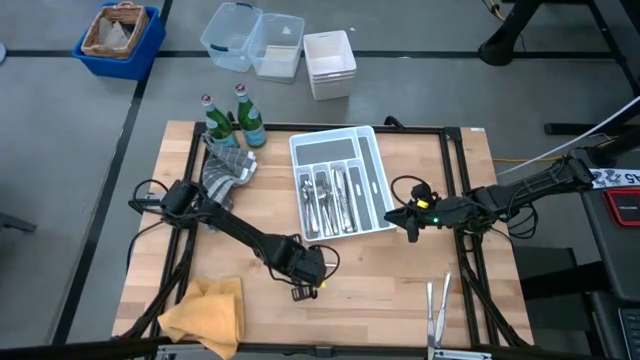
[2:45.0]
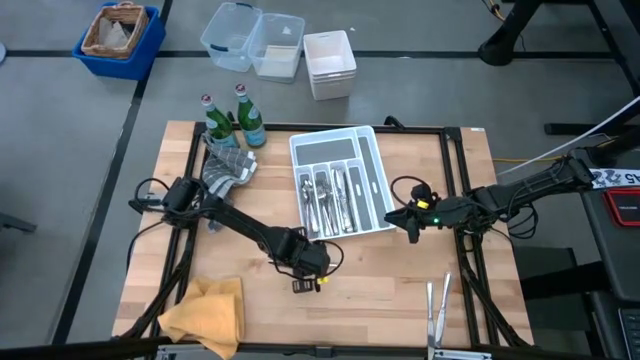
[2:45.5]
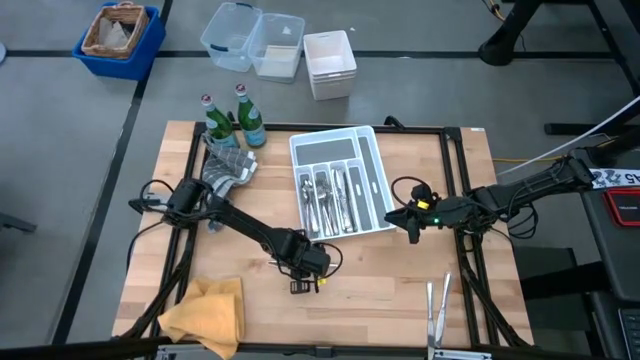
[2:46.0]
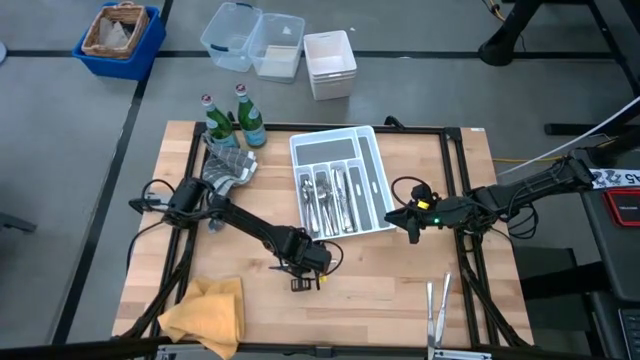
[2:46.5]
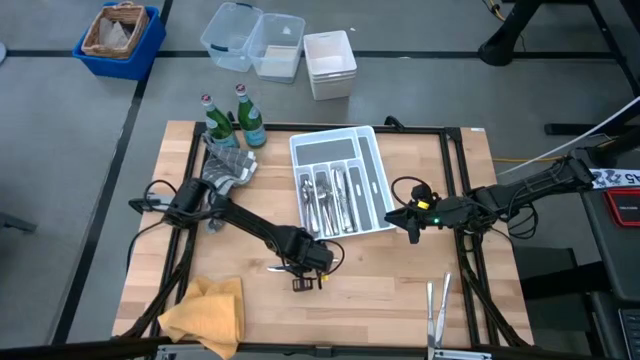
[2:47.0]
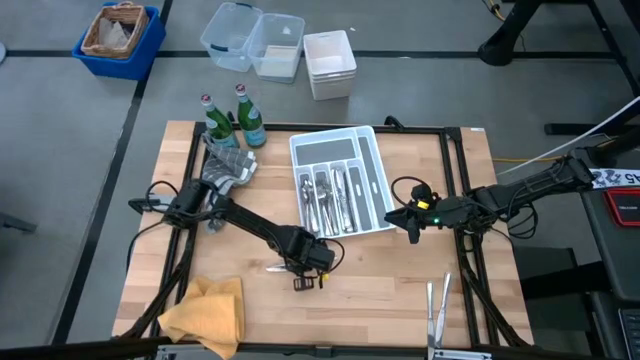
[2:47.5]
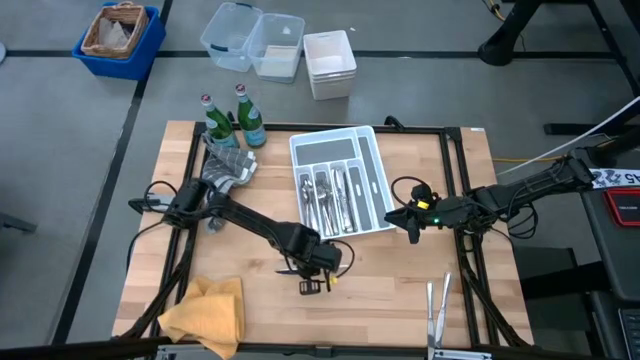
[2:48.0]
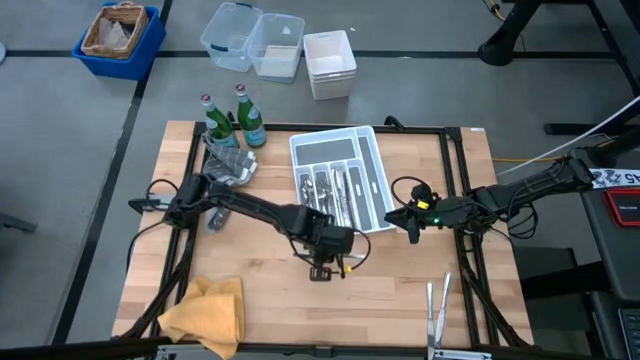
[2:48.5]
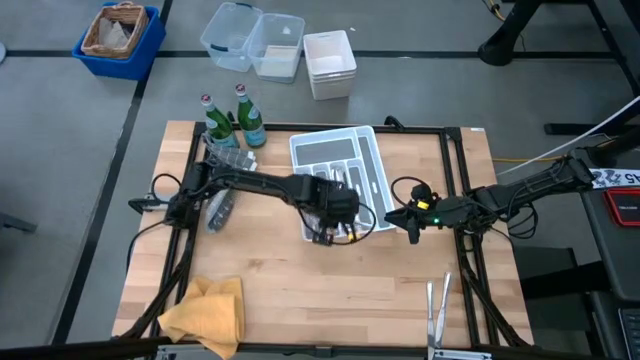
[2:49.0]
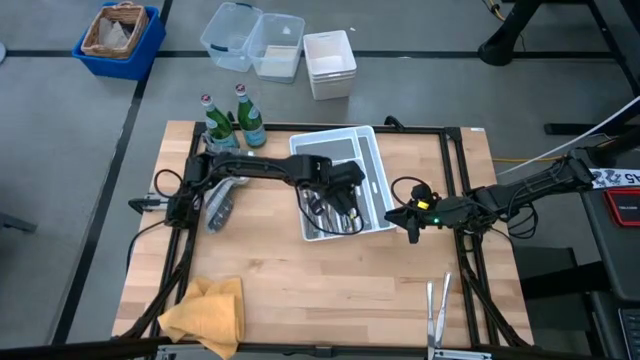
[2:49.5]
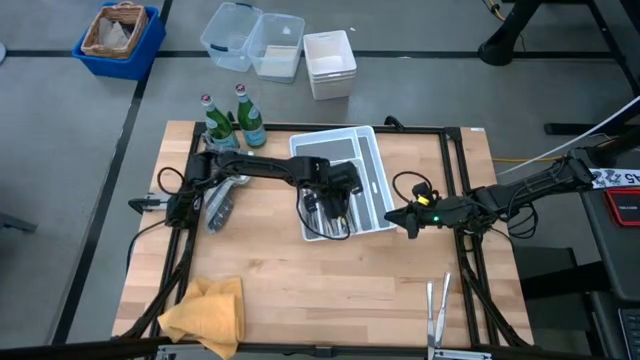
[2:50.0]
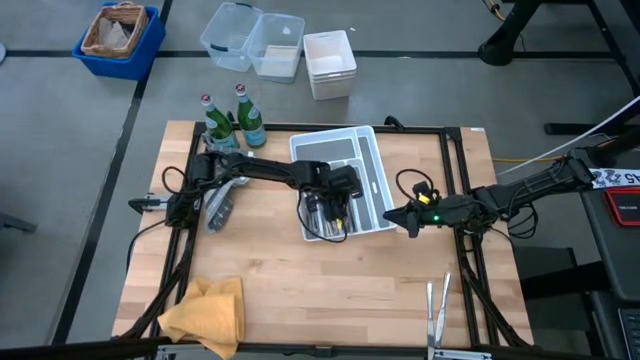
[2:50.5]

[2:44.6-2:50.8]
Task: Sort silverware
Put the silver table knife into the silverware tray

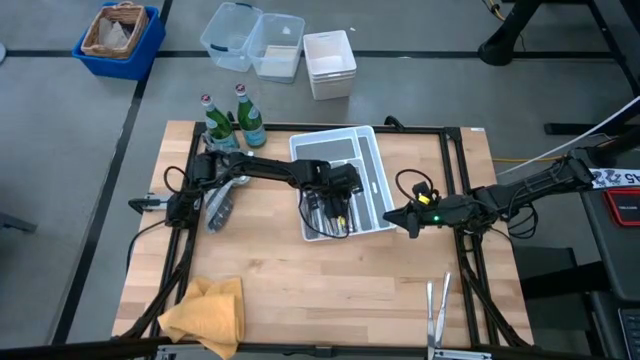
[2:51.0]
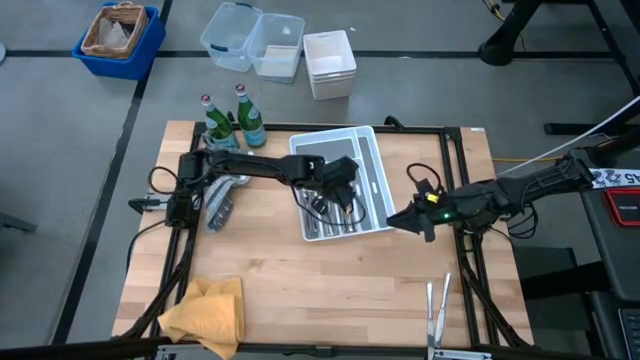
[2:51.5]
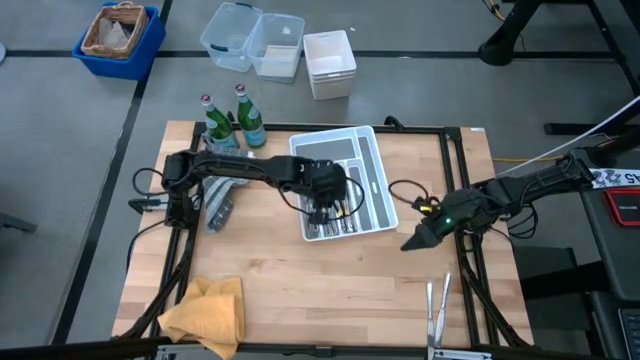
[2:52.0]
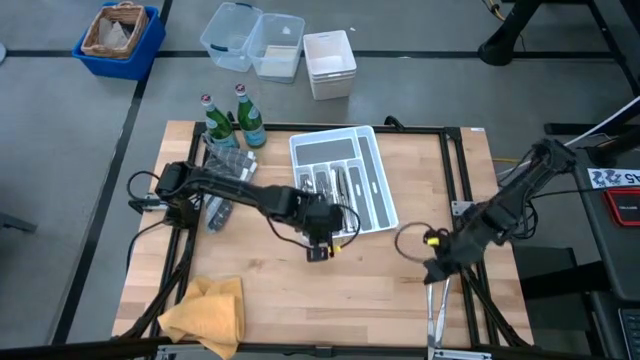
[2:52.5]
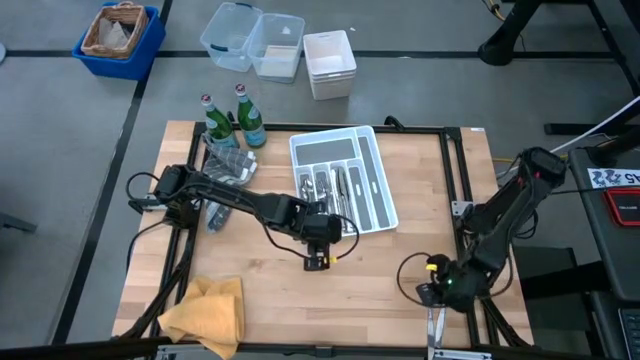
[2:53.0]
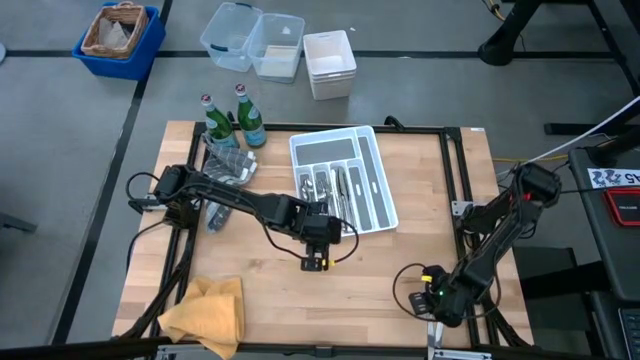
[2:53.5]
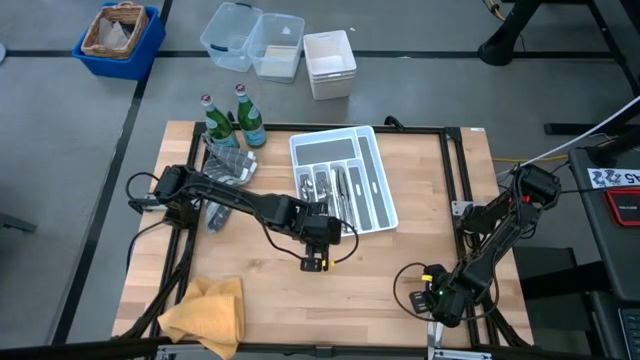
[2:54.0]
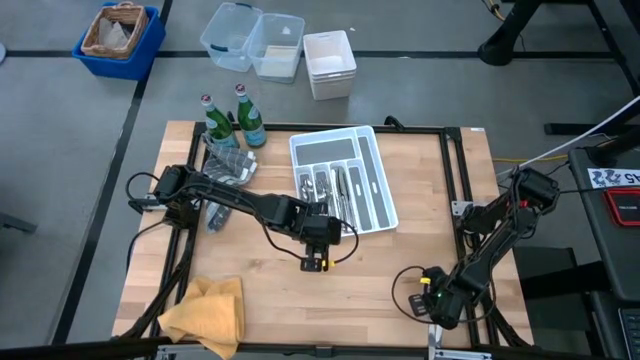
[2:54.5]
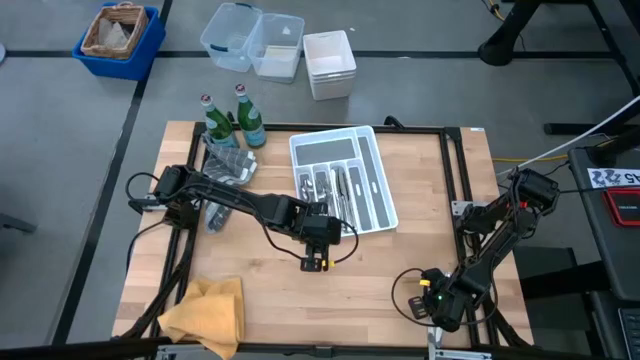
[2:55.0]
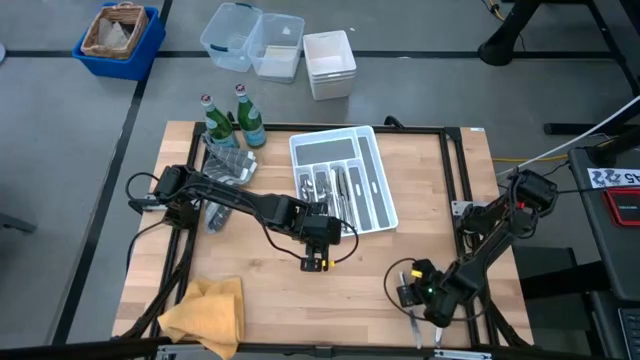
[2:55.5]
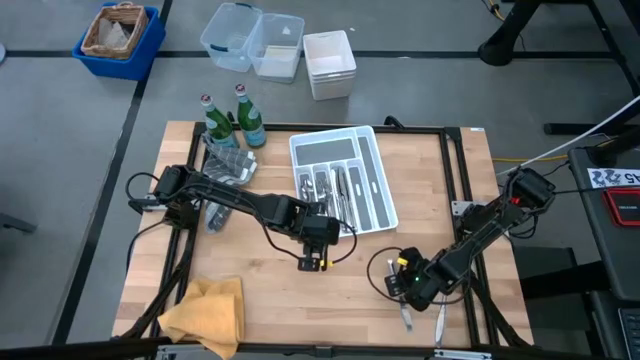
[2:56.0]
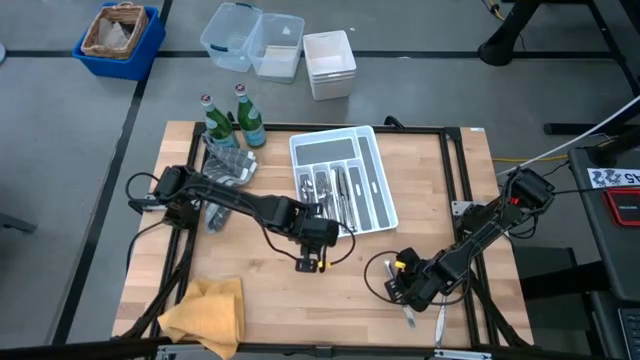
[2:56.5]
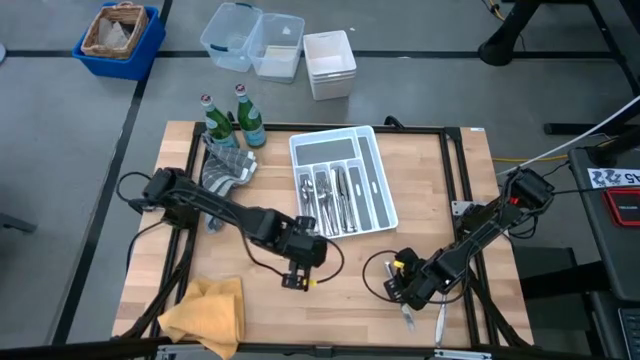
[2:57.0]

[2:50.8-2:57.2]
Put the silver table knife into the silverware tray

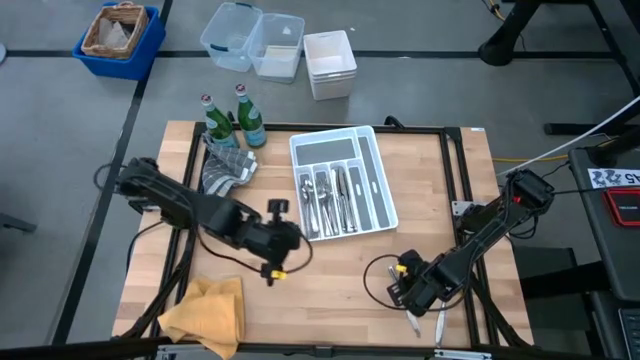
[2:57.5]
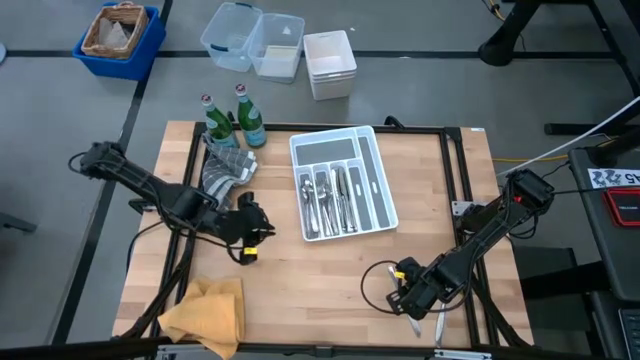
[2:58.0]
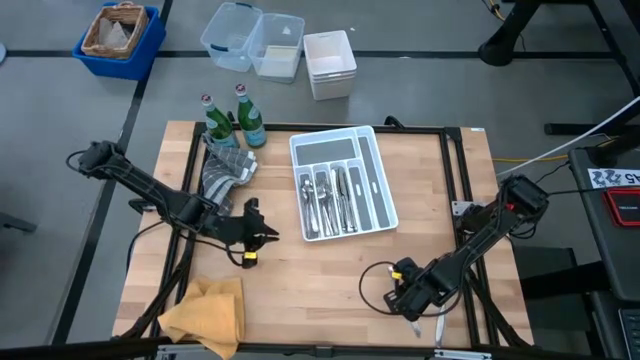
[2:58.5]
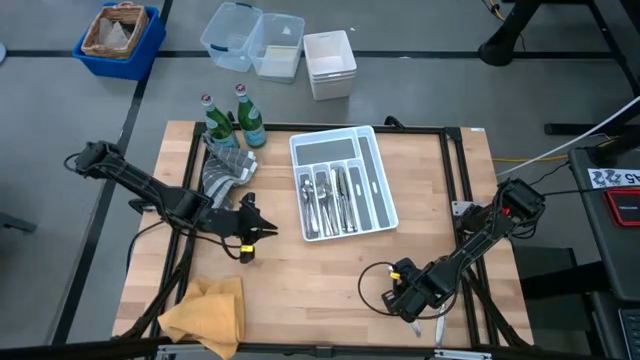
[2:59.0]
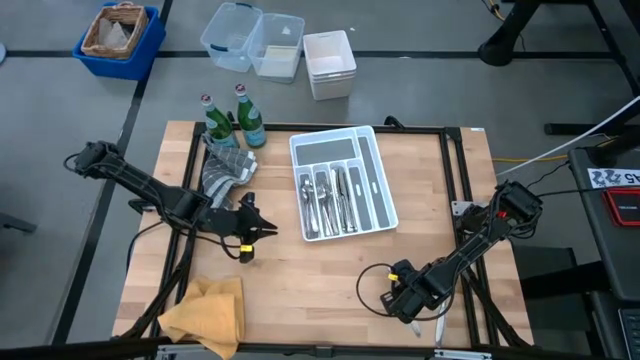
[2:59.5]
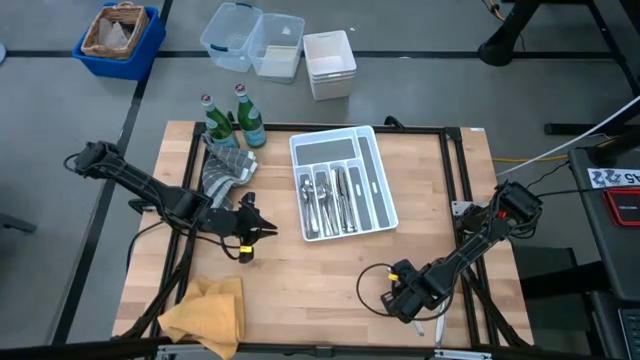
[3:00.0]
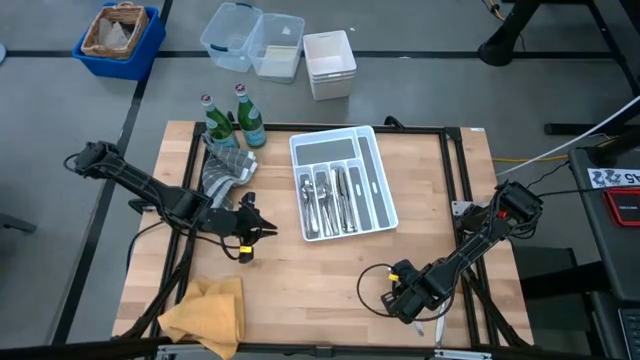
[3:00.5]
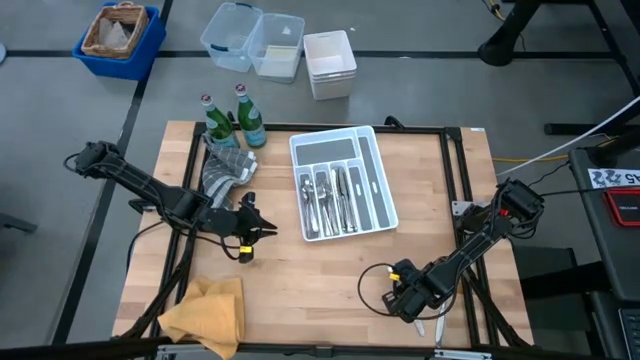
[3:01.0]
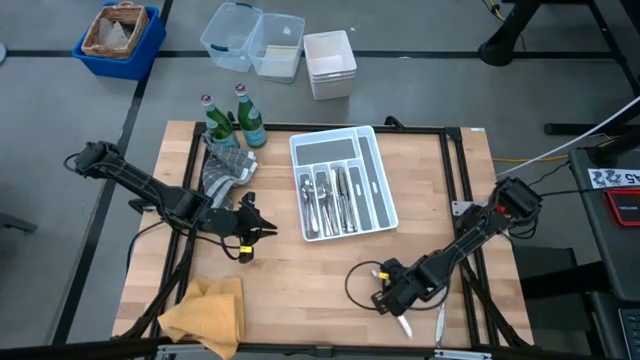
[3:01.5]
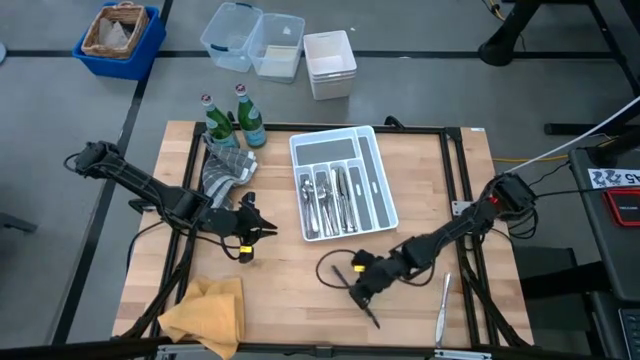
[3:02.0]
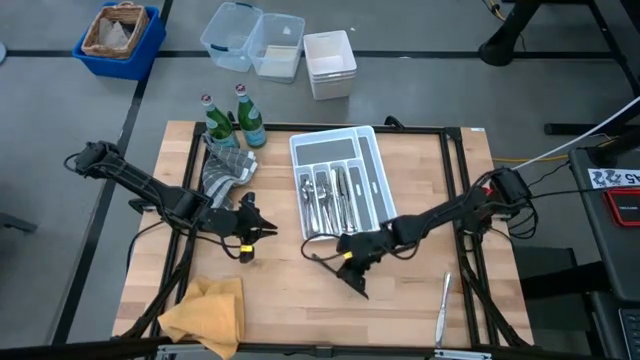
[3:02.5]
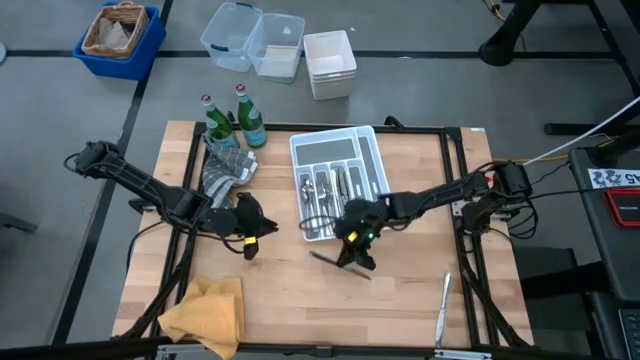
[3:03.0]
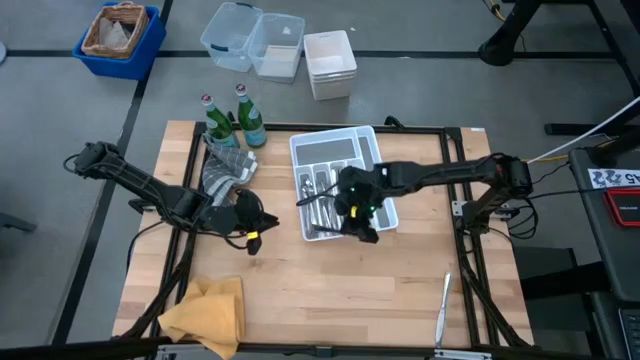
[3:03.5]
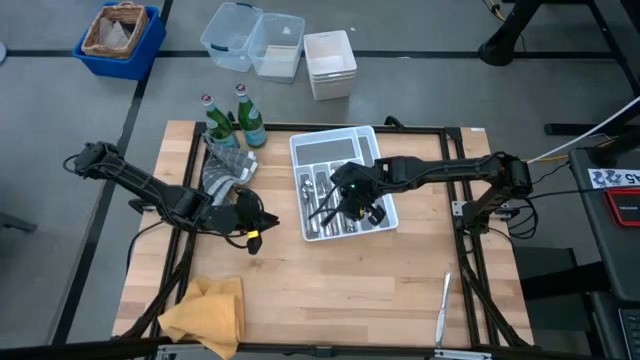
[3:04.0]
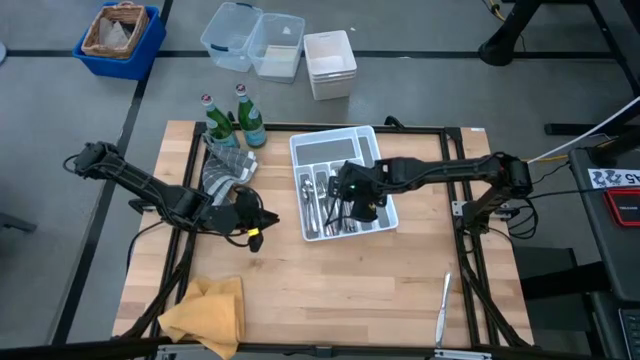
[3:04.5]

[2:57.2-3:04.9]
Put the silver table knife into the silverware tray

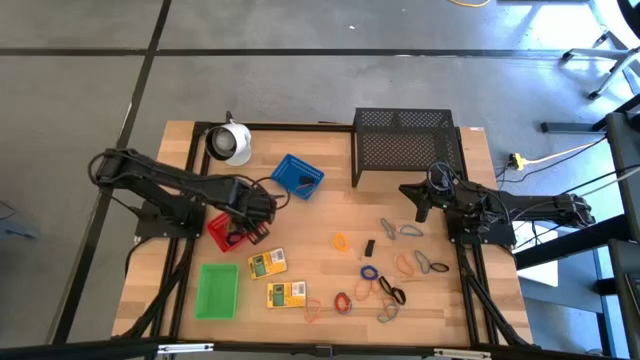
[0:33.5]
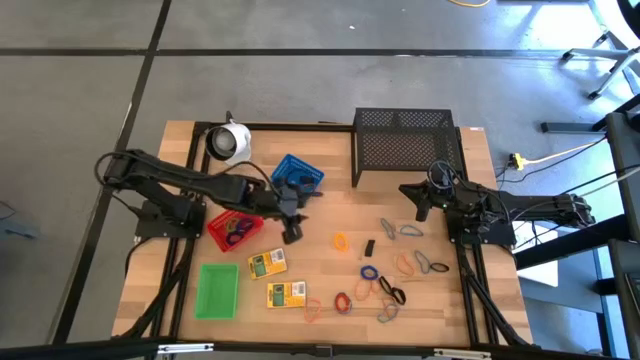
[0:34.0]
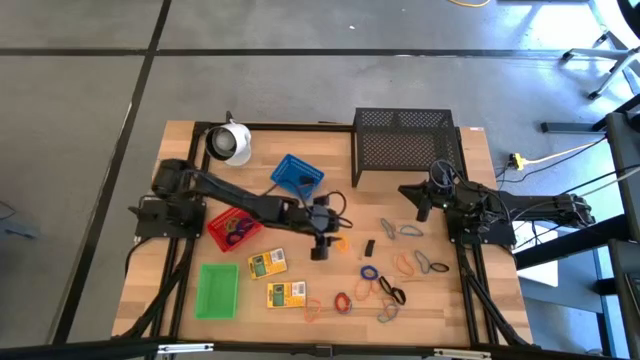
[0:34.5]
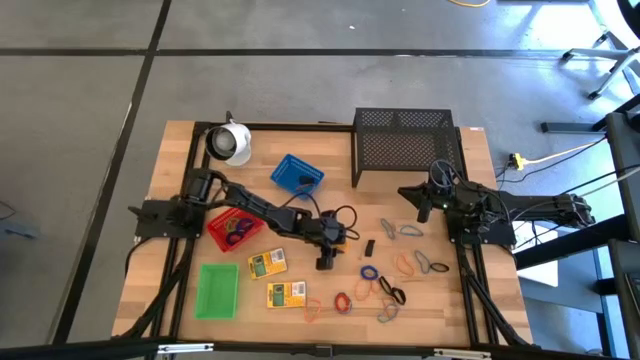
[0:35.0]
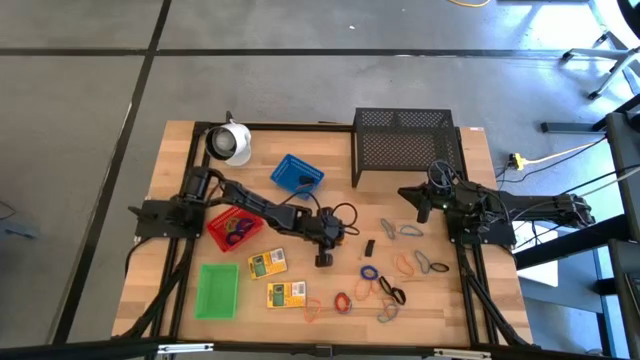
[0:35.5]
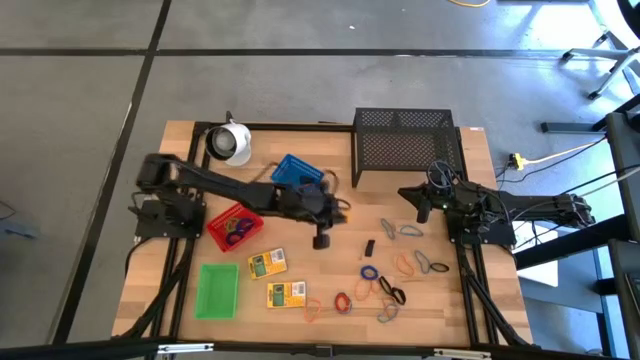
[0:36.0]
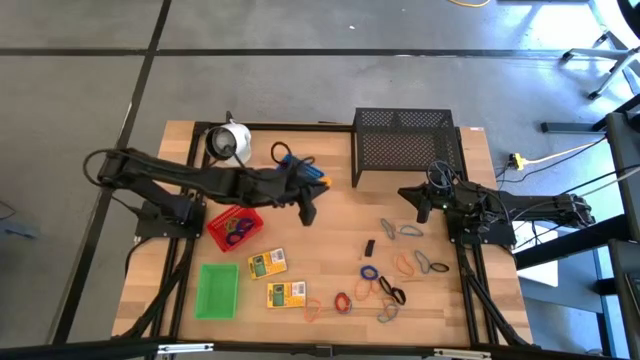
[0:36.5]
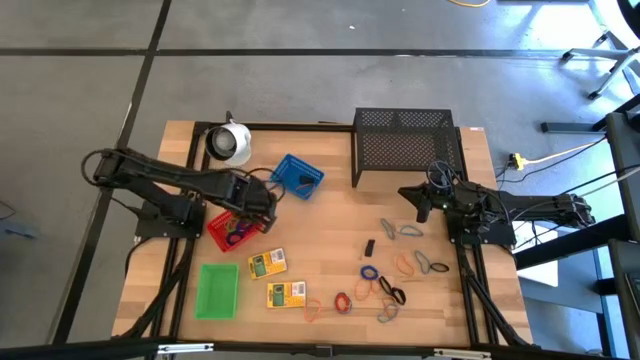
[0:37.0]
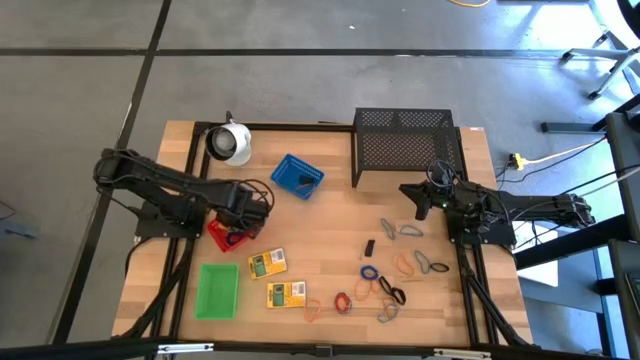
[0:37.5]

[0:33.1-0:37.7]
Task: Pick & Place Office Desk Supplies
Put the yellow spring keychain into the red bin
